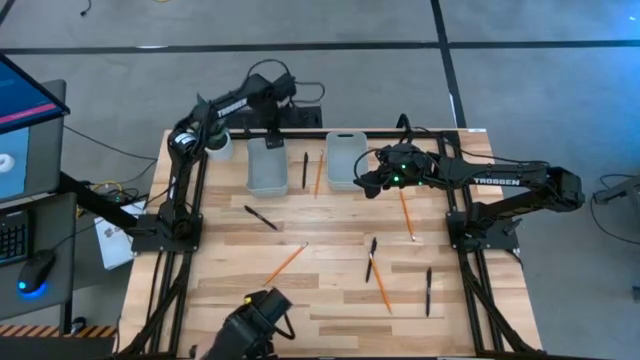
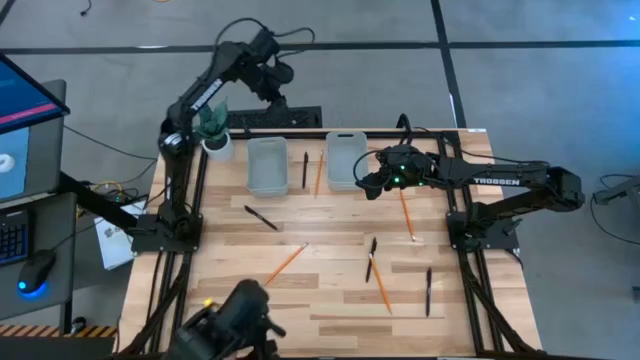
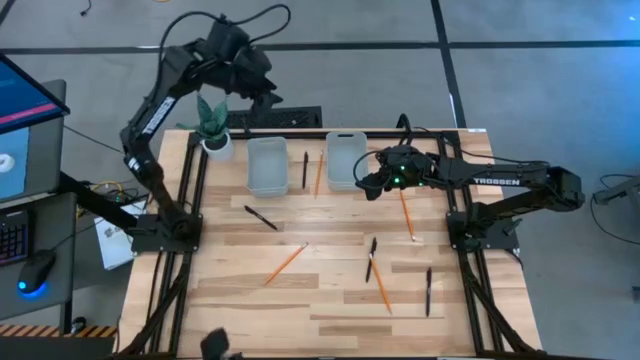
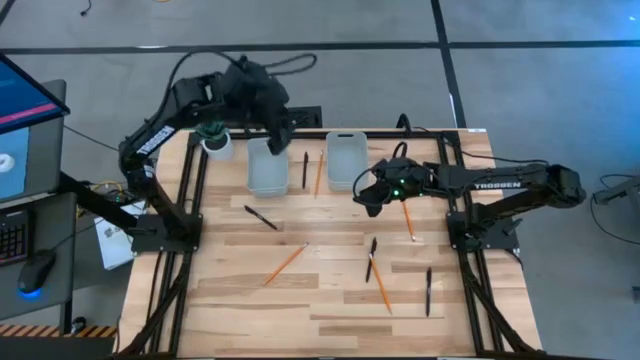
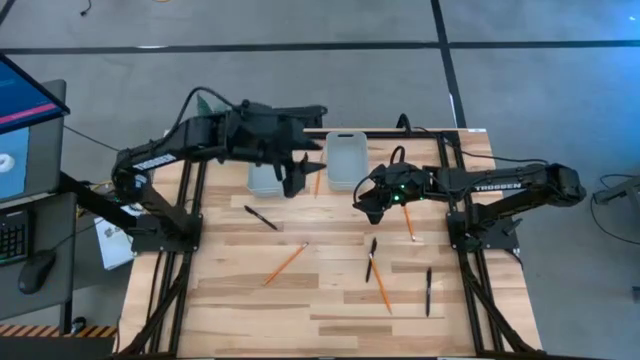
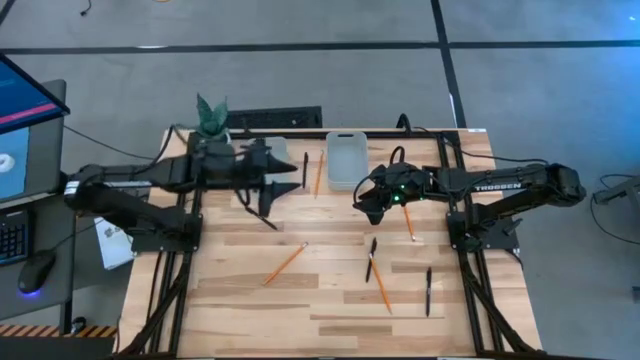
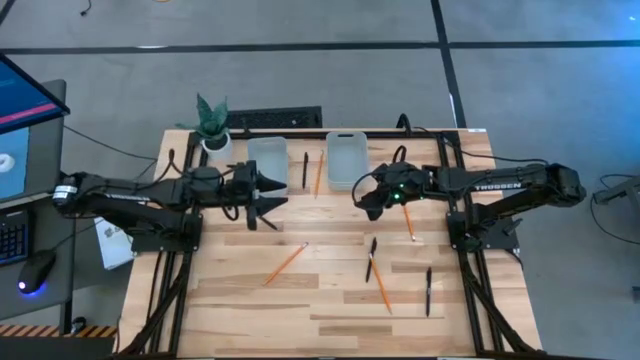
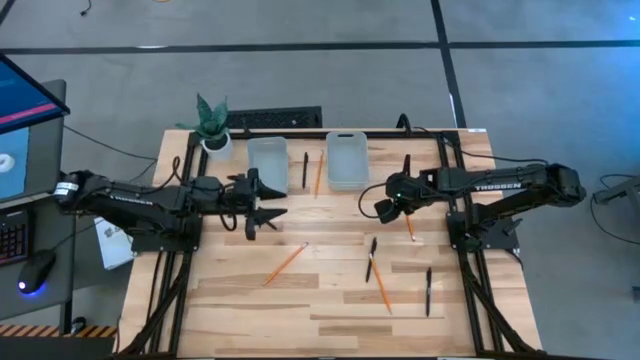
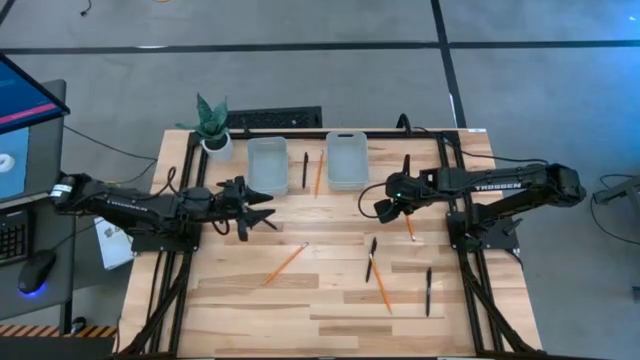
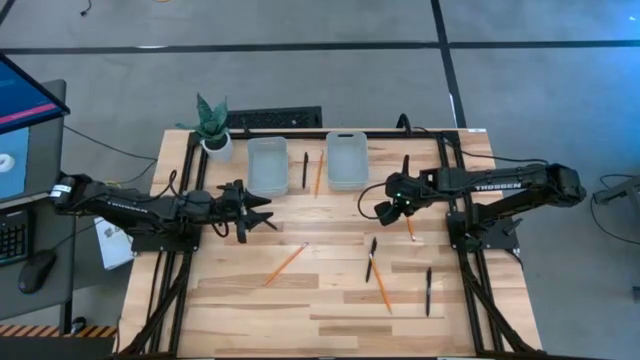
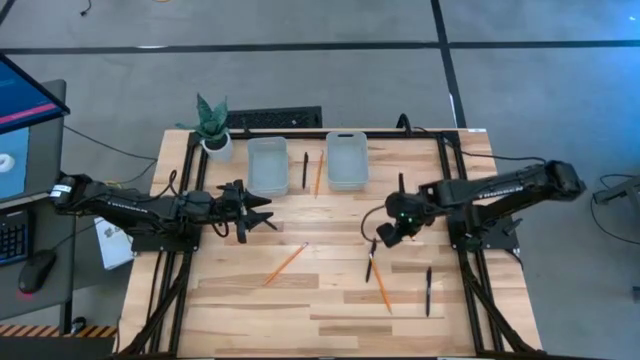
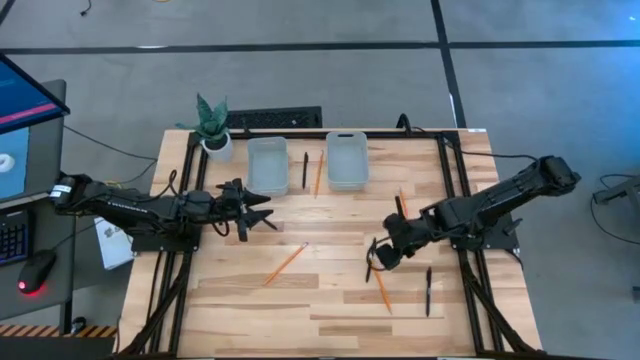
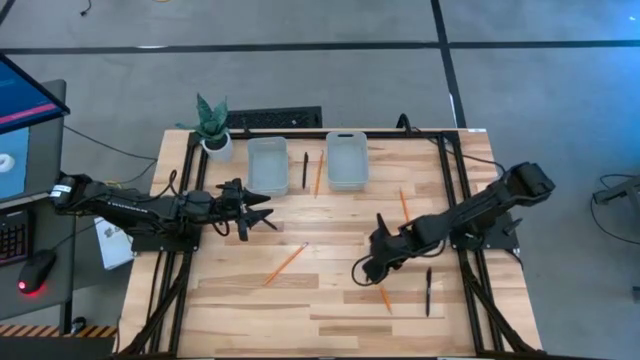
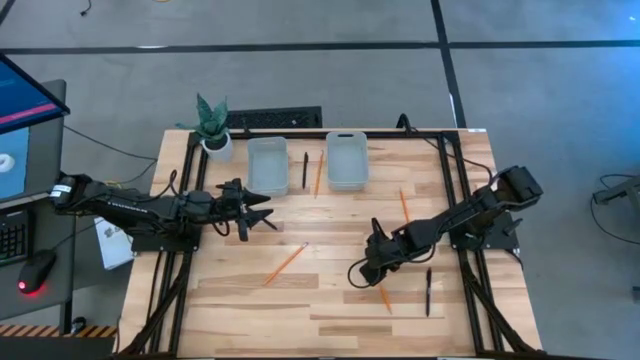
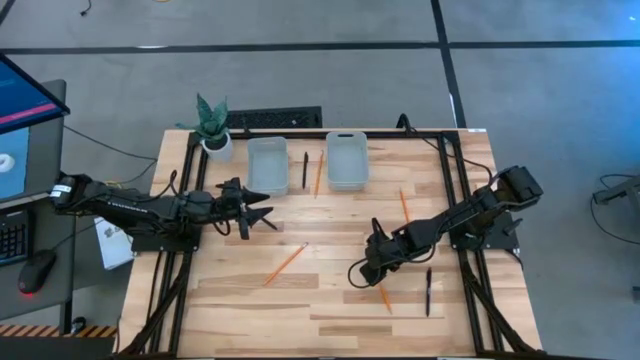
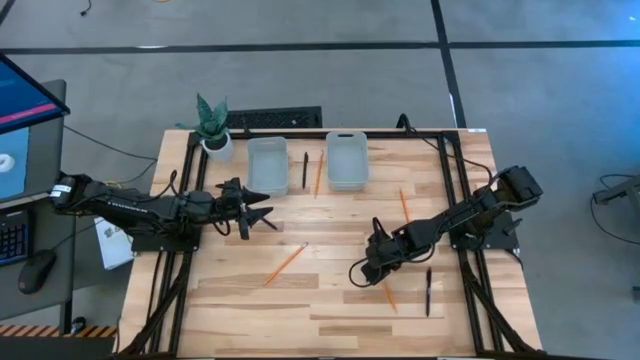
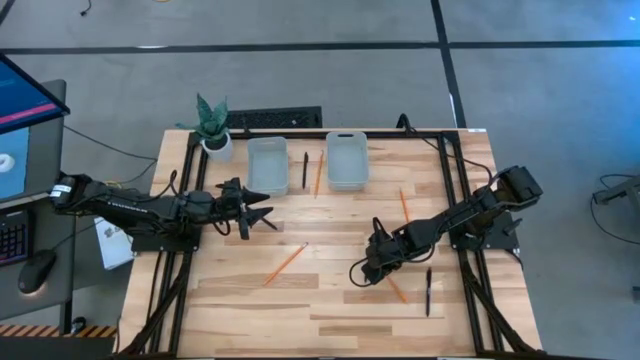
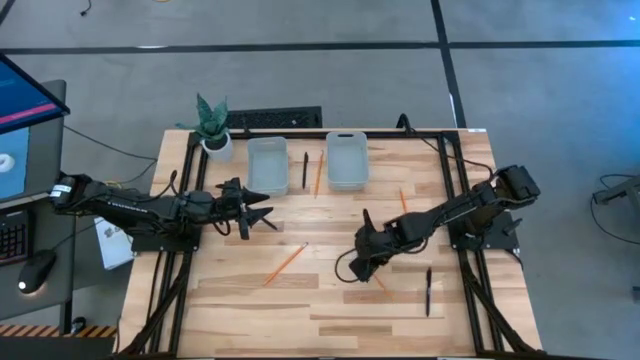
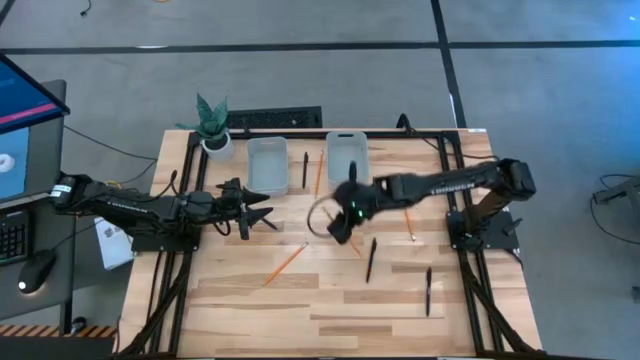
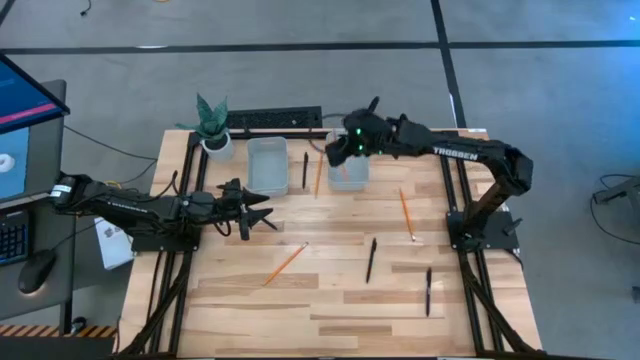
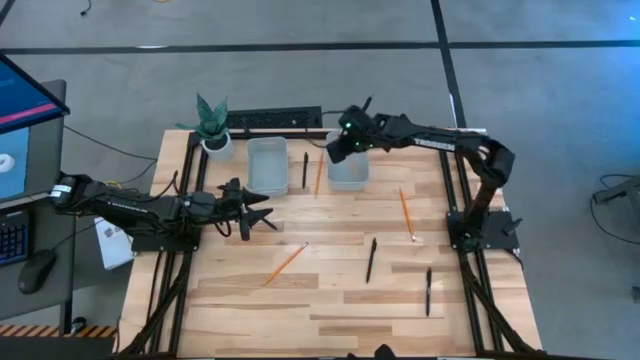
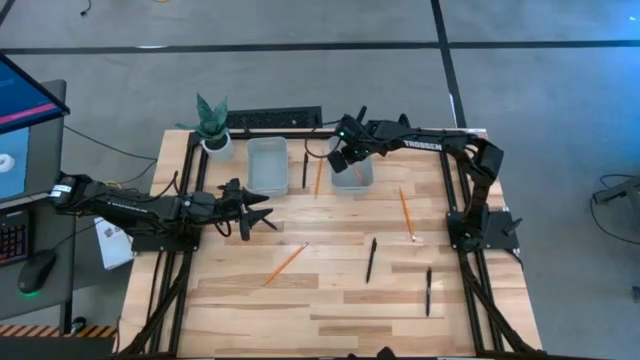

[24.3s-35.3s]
Task: Sort pens & pencils
Put the orange pencil into the right gray bin

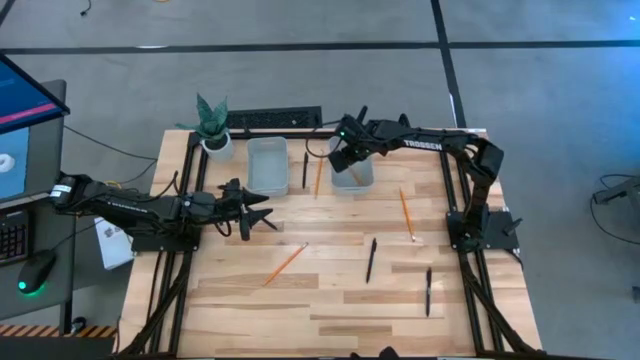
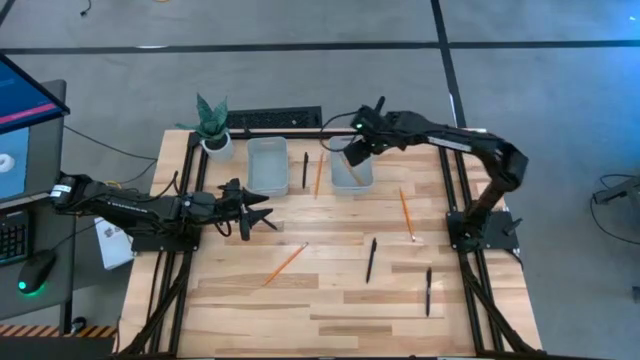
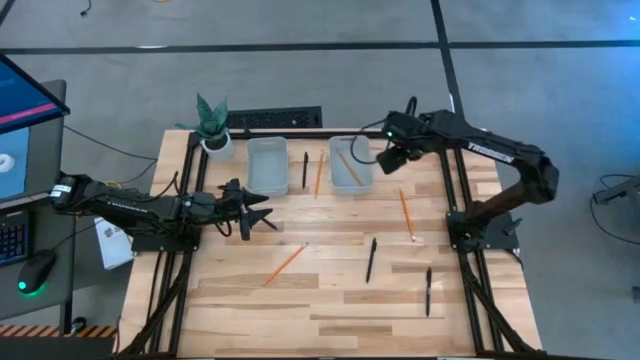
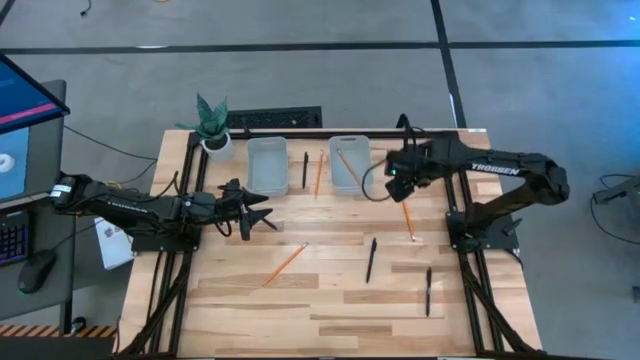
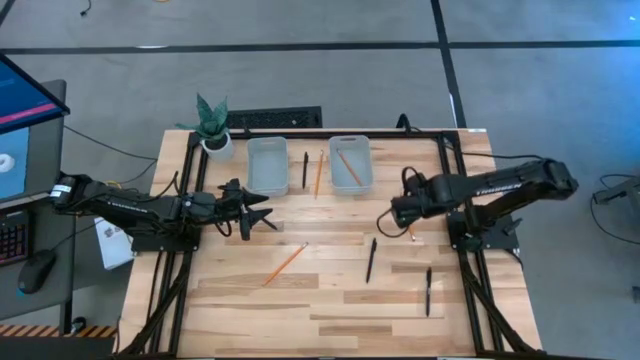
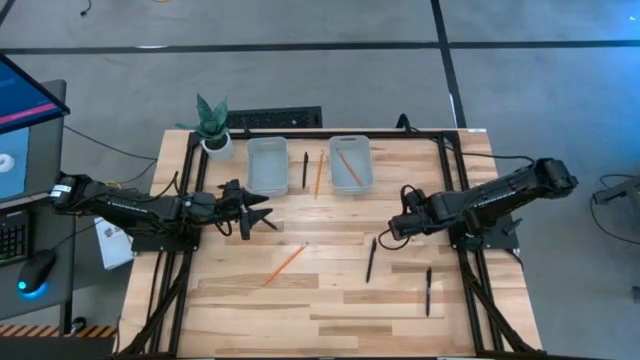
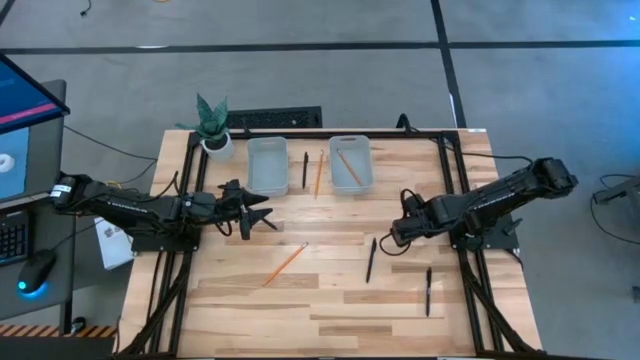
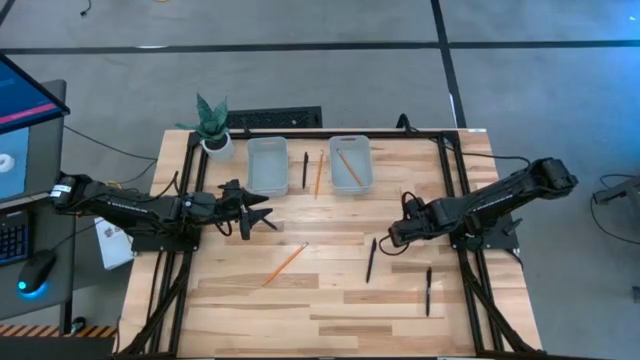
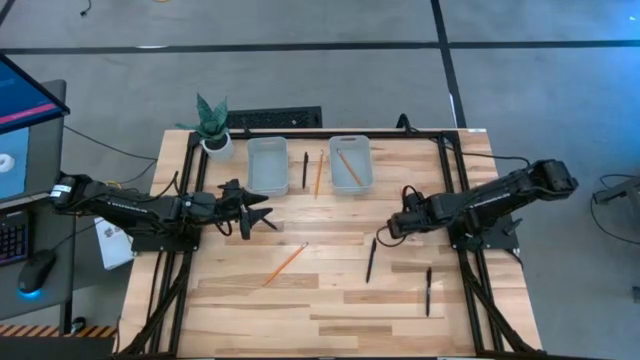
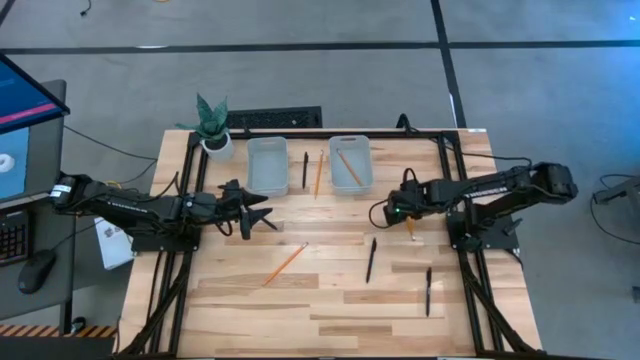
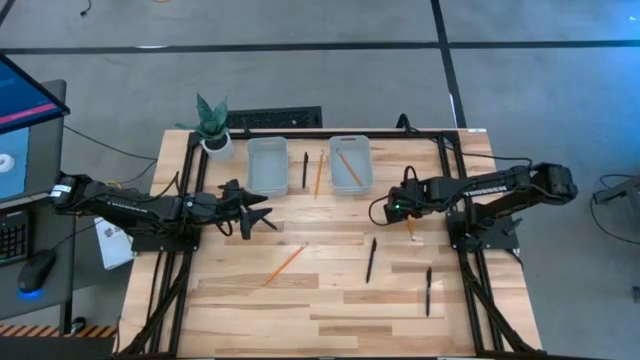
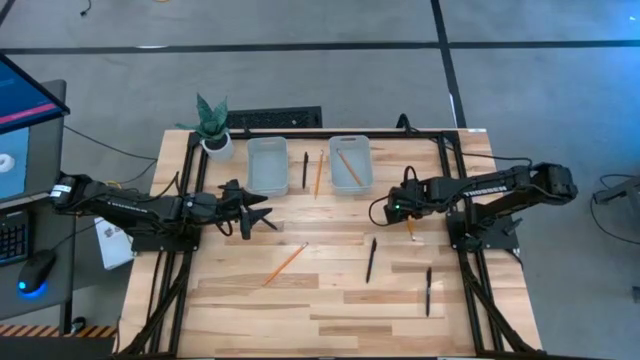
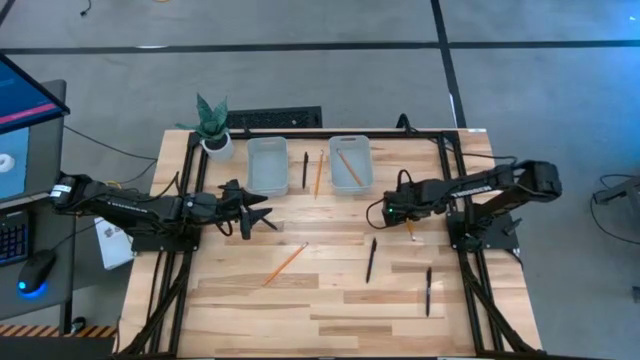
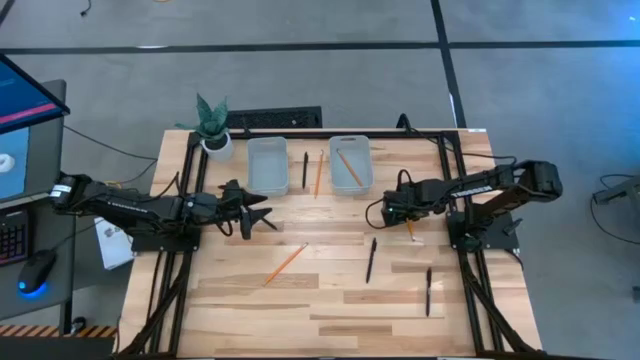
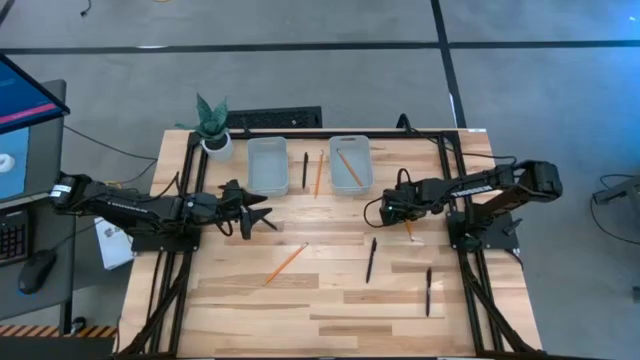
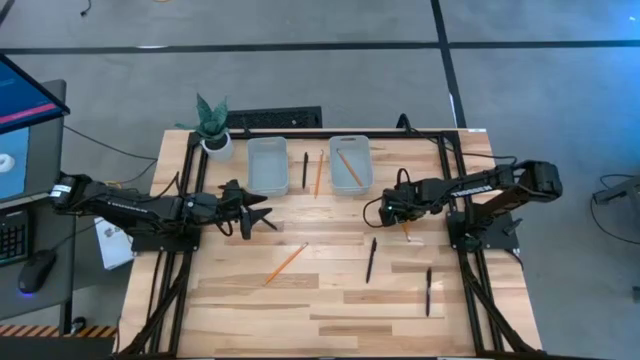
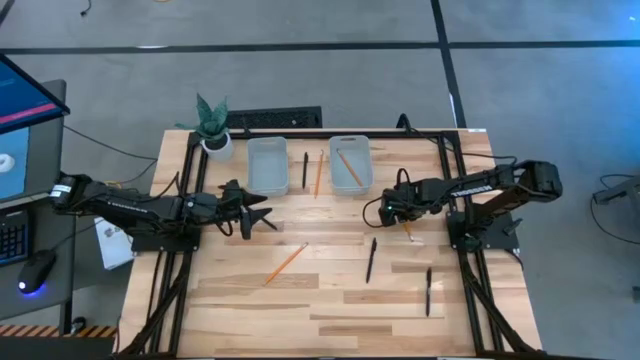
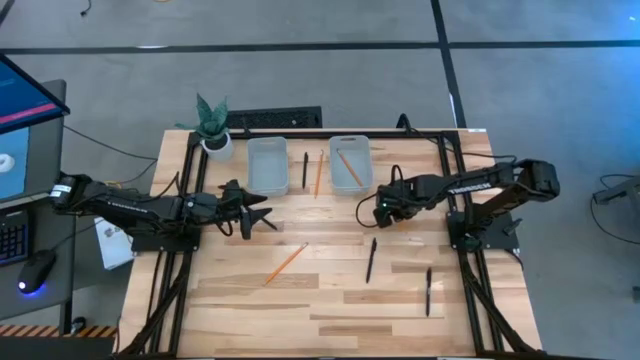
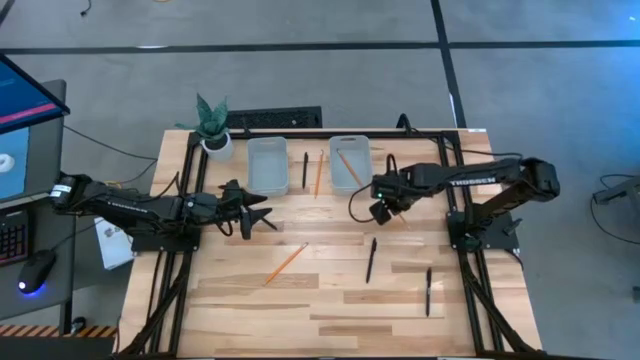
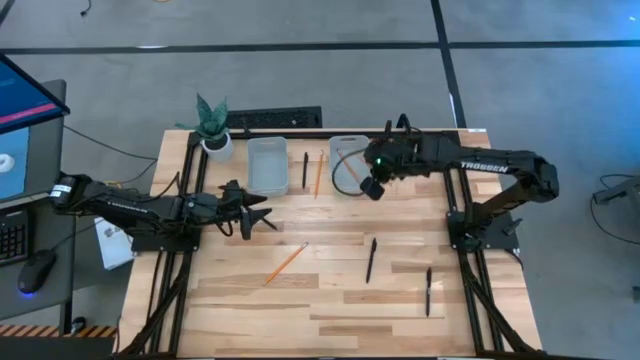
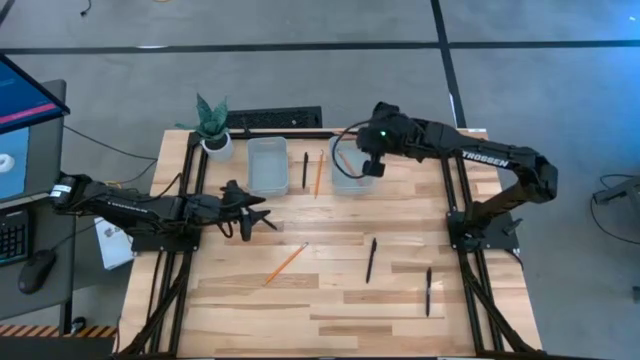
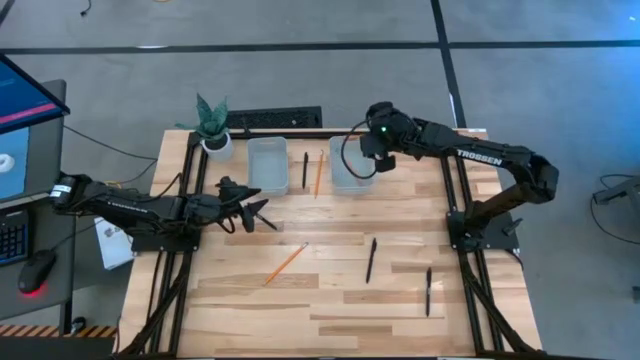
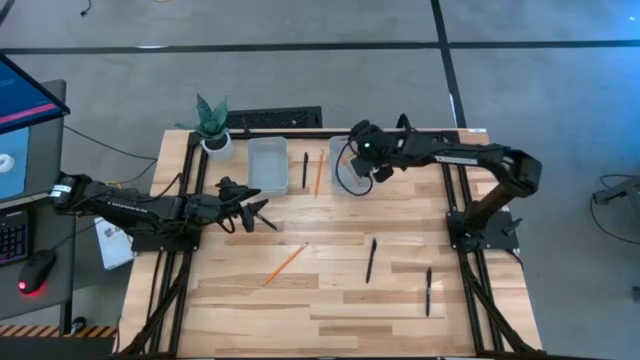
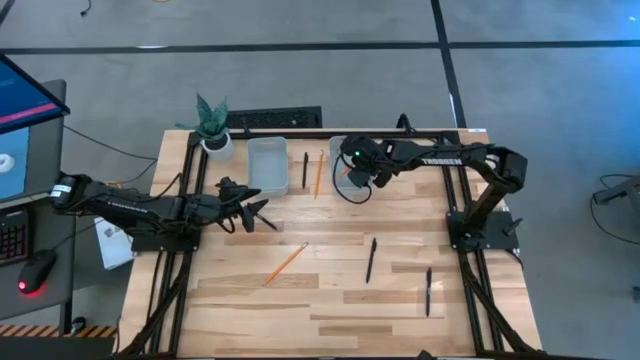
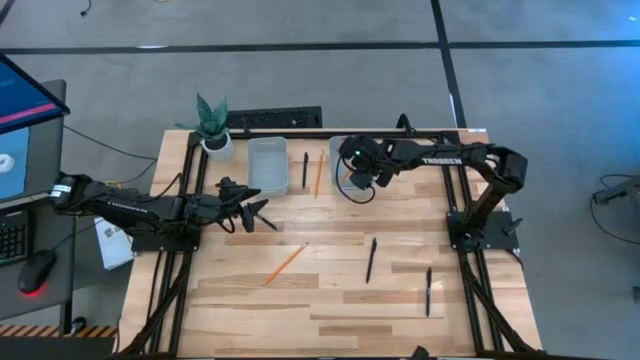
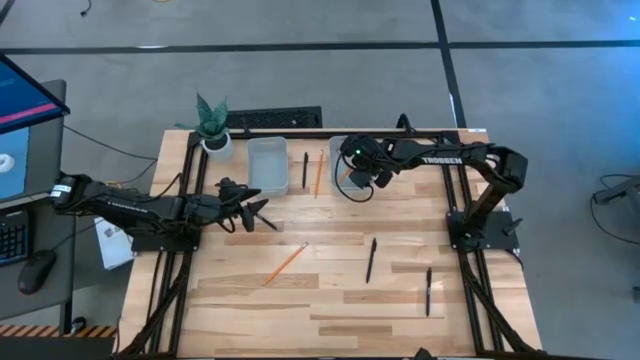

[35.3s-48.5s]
Put the orange pencil into the right gray bin
